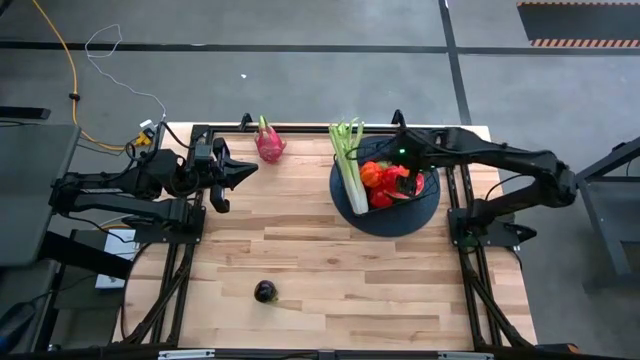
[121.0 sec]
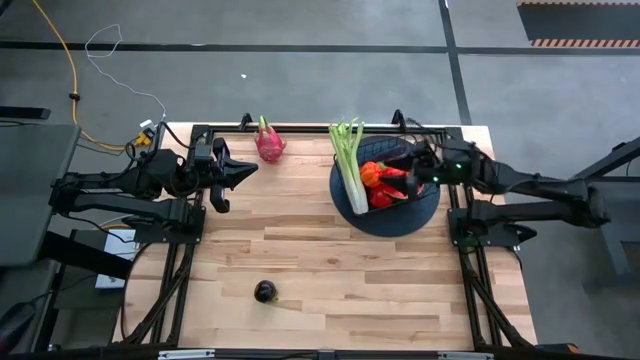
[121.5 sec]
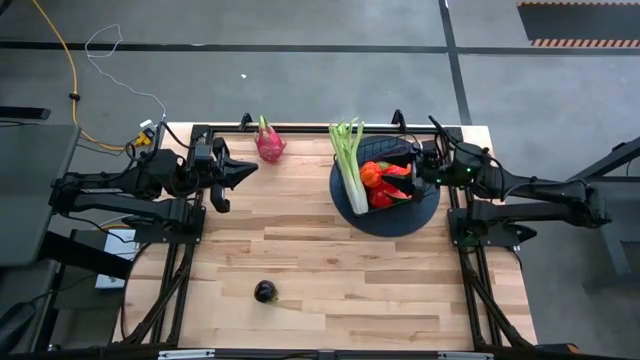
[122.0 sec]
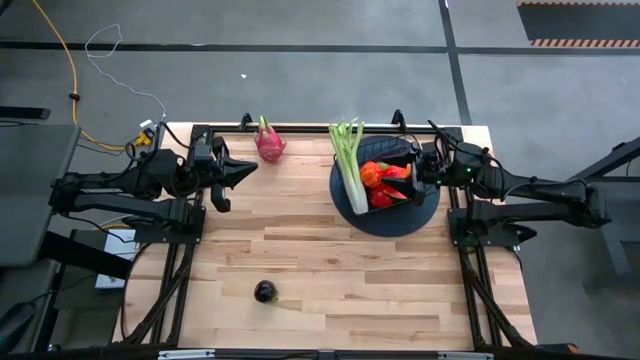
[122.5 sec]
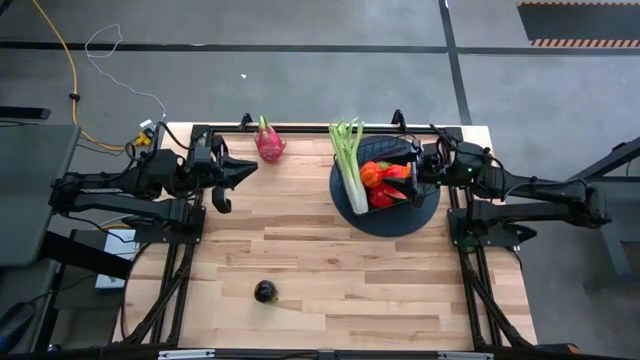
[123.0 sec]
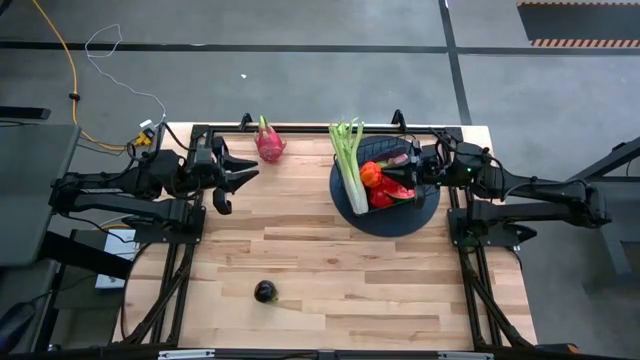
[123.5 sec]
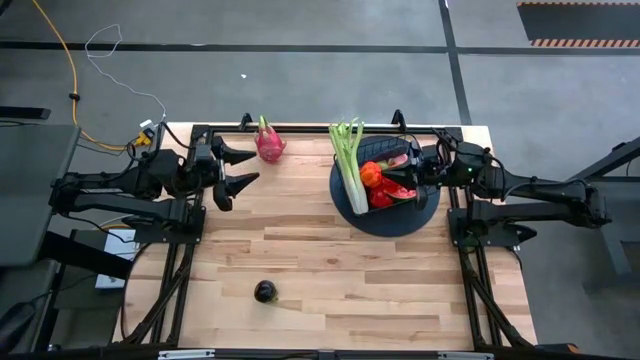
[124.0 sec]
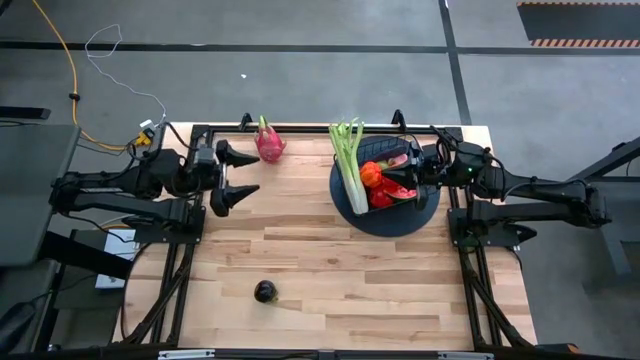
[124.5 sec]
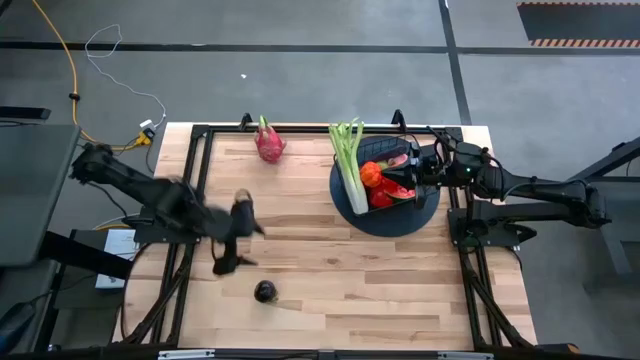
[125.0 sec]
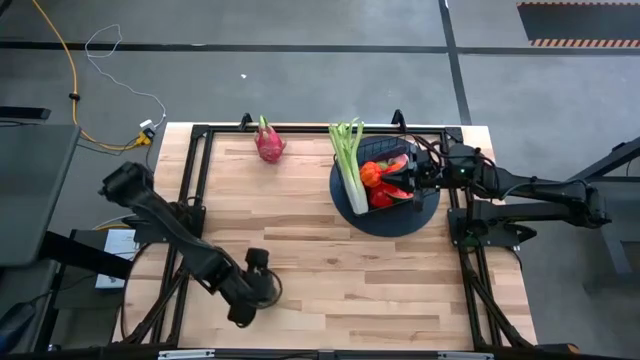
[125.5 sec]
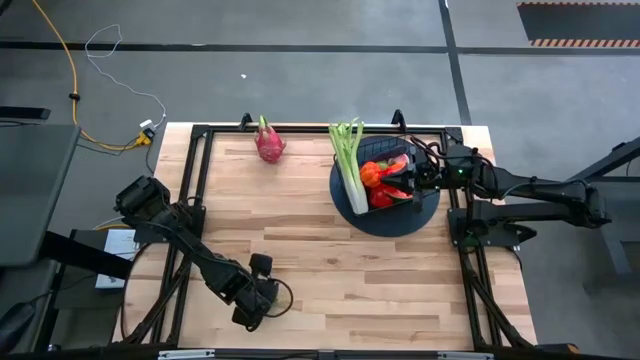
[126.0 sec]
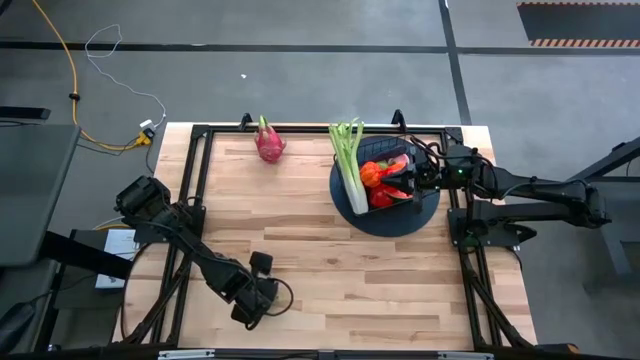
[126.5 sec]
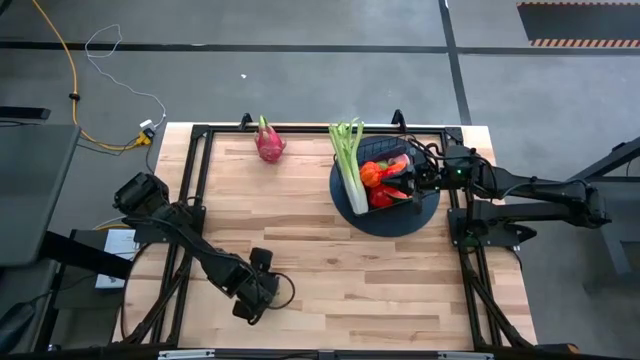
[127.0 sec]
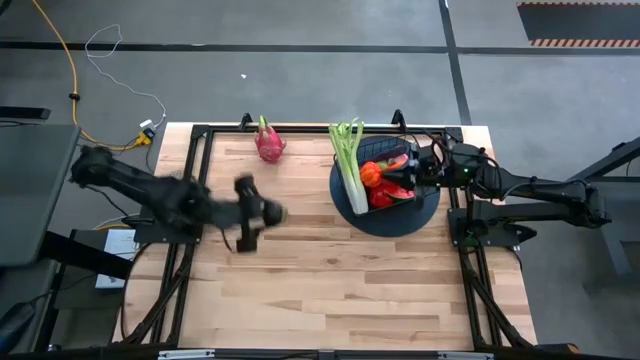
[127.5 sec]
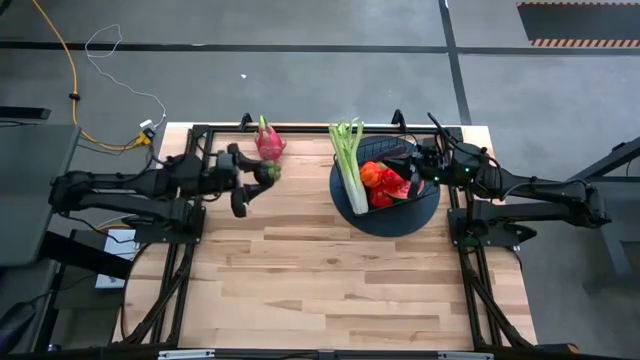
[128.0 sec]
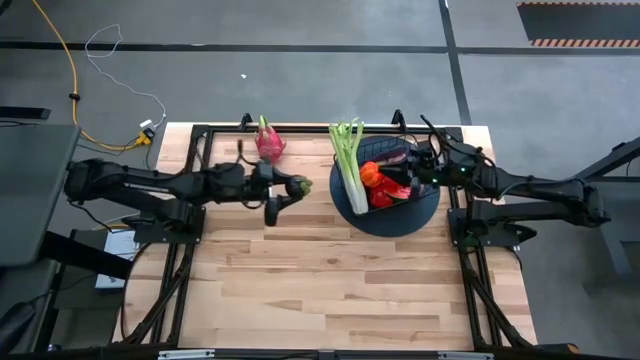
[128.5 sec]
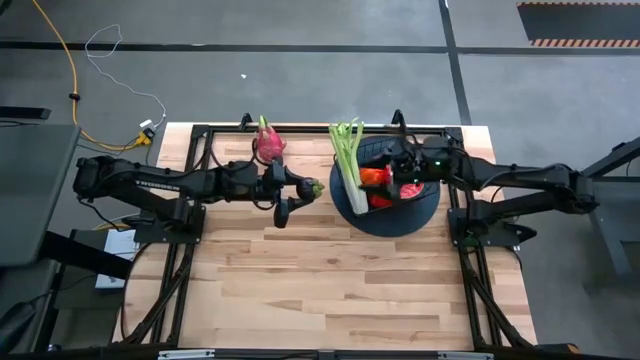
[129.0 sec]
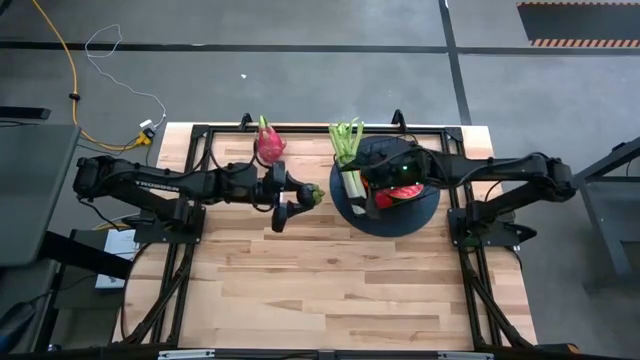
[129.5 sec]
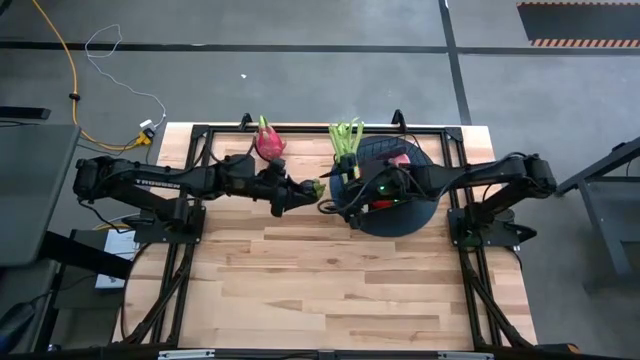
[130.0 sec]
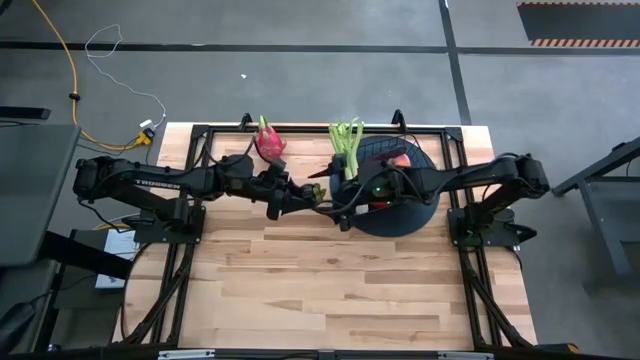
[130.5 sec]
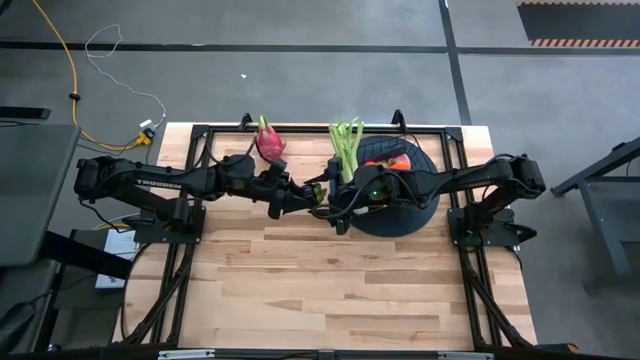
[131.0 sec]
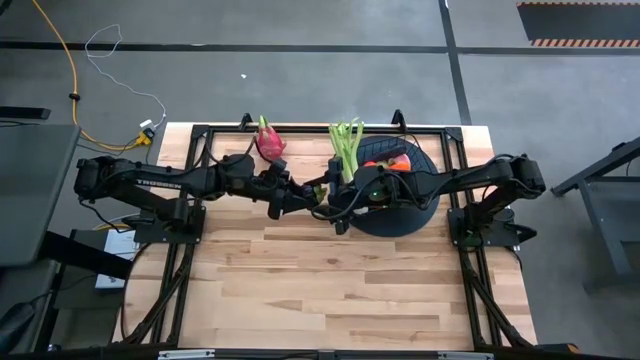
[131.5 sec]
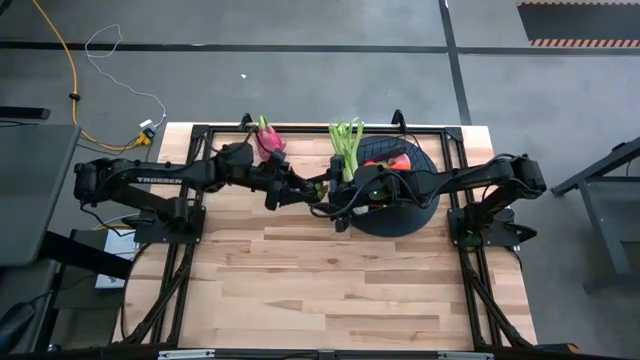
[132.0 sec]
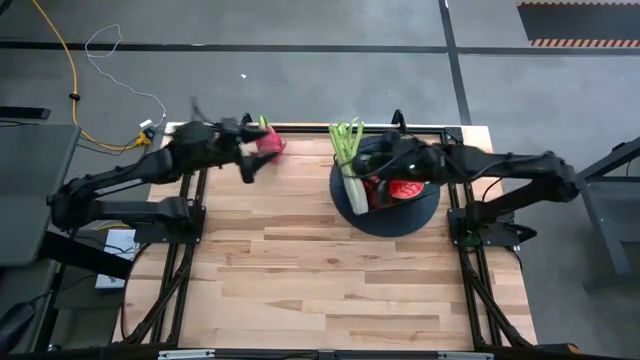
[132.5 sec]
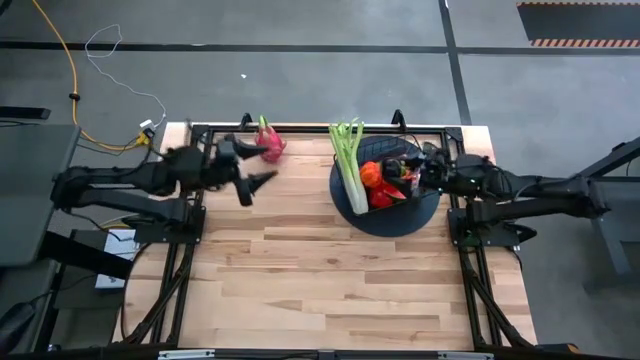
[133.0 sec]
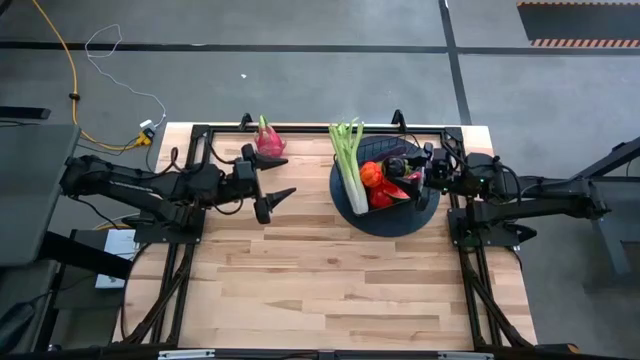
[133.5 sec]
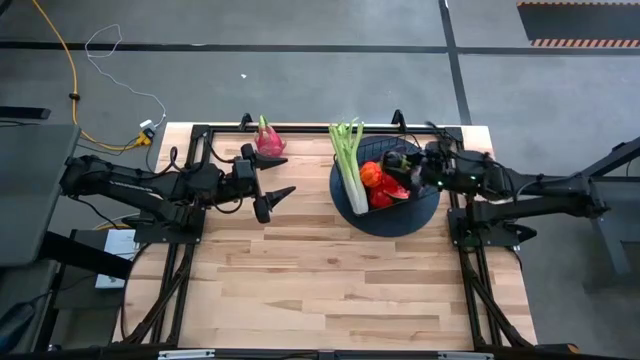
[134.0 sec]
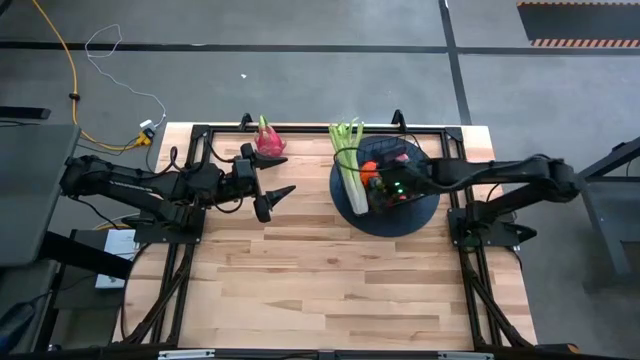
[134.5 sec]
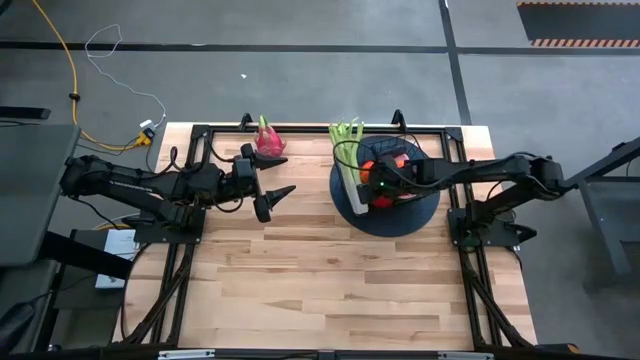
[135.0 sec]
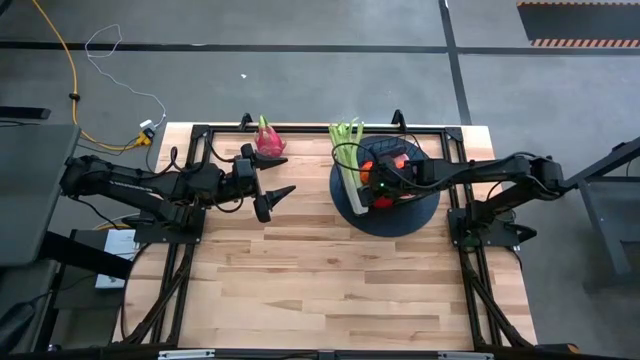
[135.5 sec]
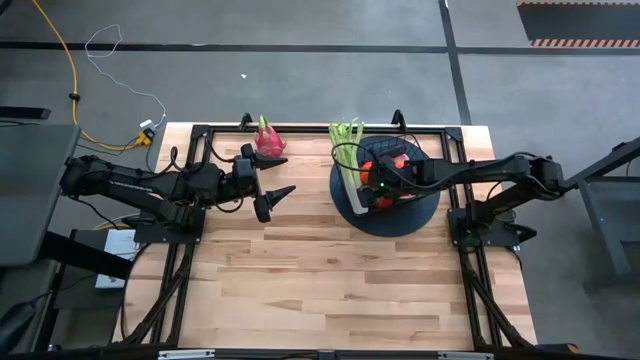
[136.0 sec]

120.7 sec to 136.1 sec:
Task: Build produce basket
Put the mangosteen into the wire basket

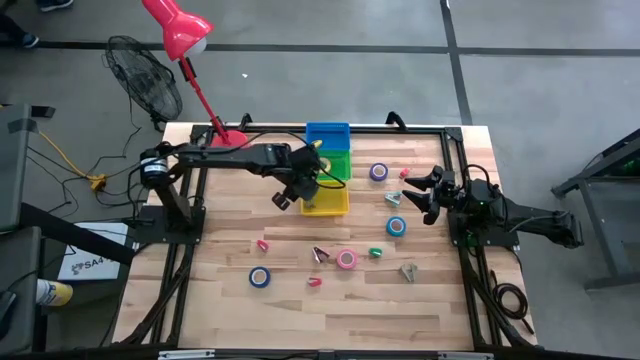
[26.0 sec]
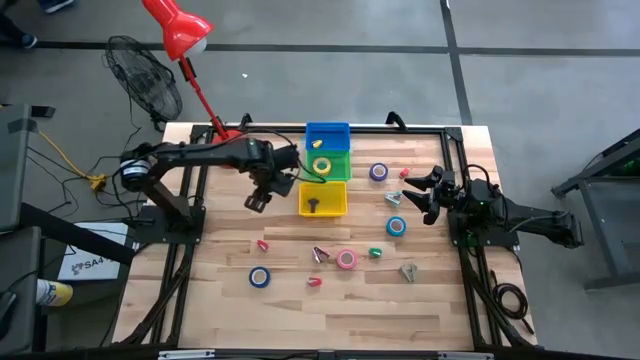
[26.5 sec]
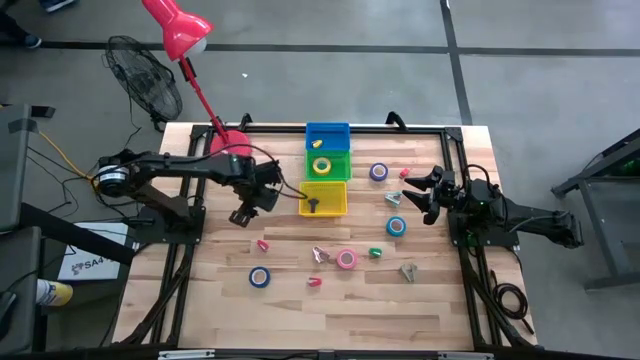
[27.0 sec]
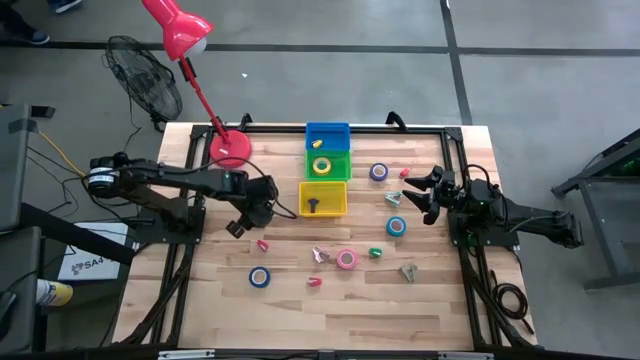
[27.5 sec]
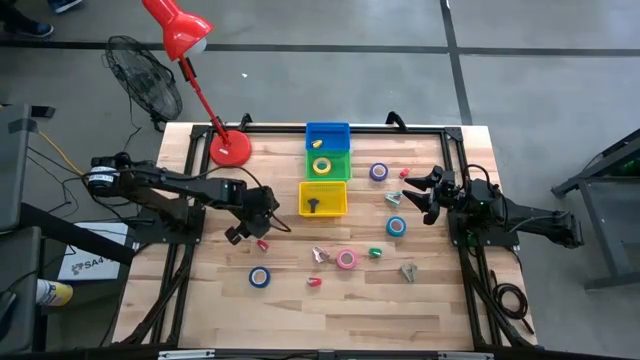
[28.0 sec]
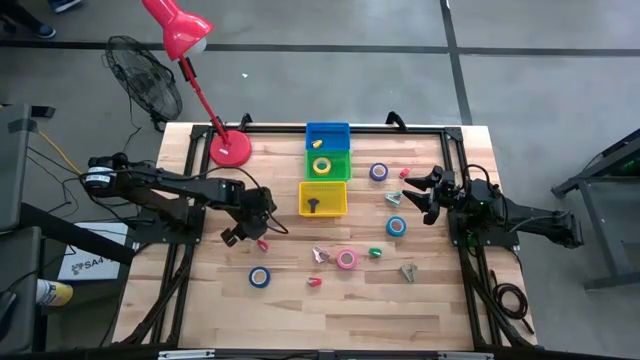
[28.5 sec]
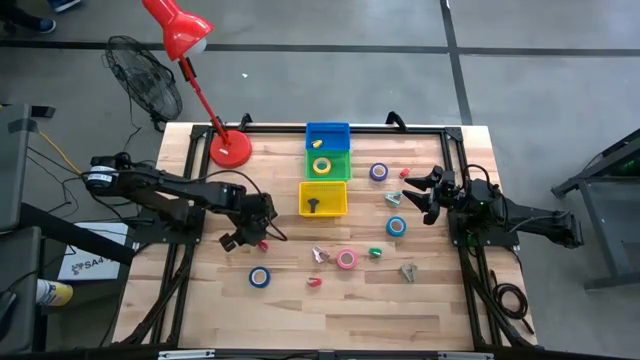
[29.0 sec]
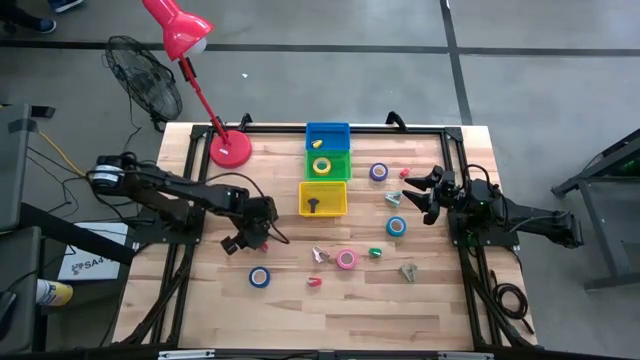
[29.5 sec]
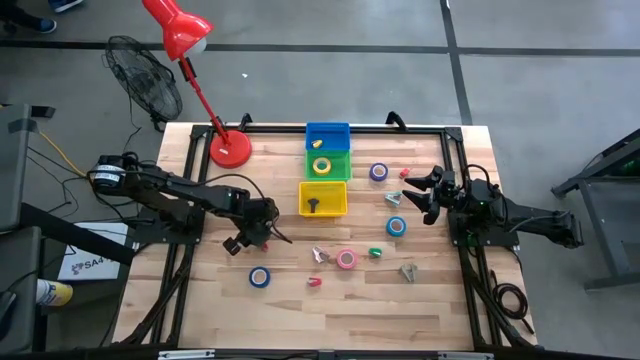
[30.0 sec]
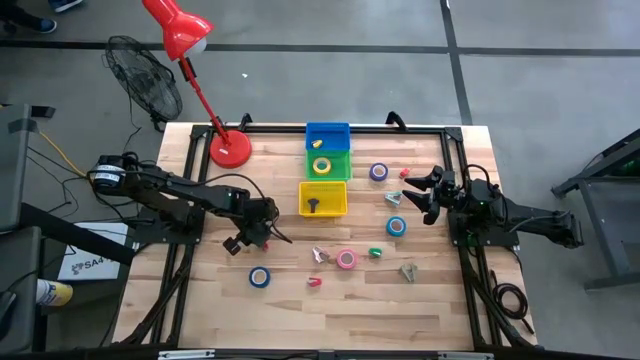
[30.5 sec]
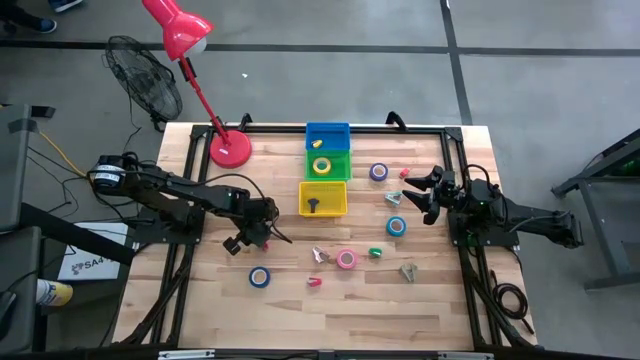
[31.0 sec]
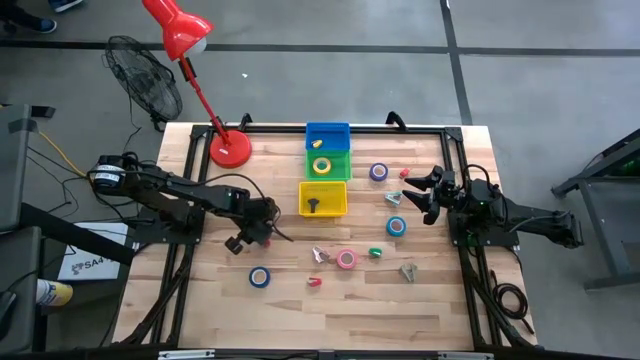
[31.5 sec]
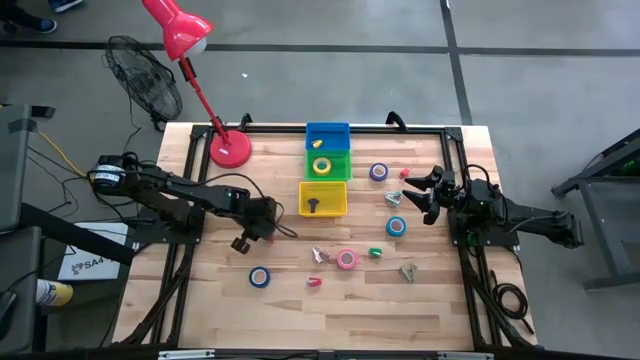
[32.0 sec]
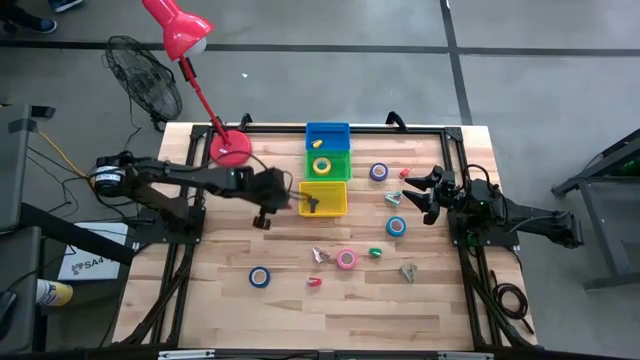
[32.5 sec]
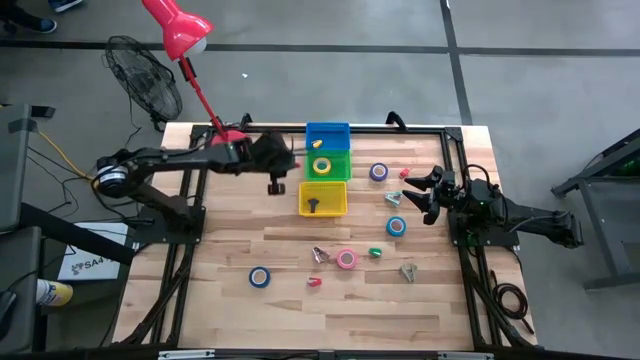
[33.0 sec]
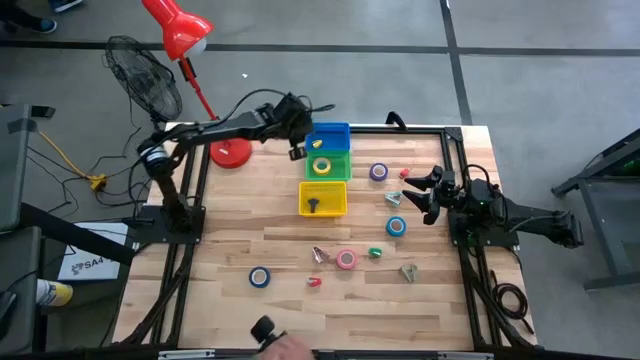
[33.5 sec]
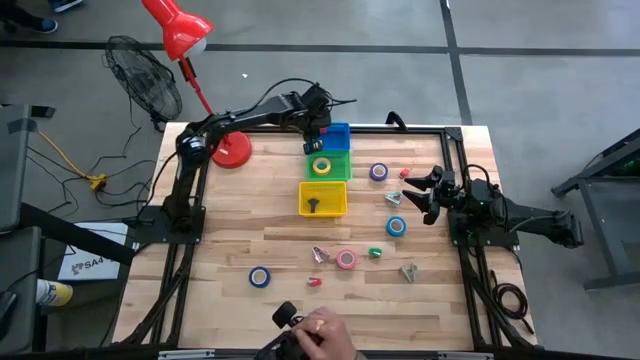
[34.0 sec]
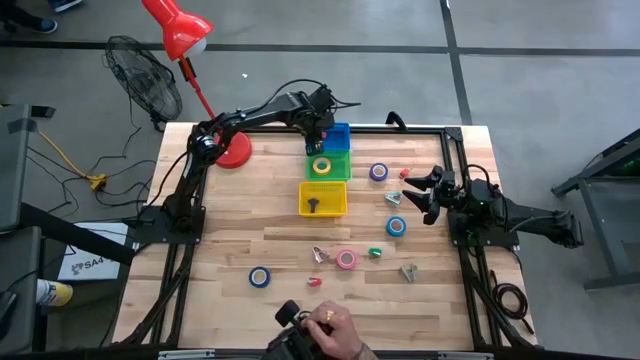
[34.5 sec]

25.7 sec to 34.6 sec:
Task: Pick and place Stapler, Stapler remover, tape
Put the middle red stapler into the blue bin
